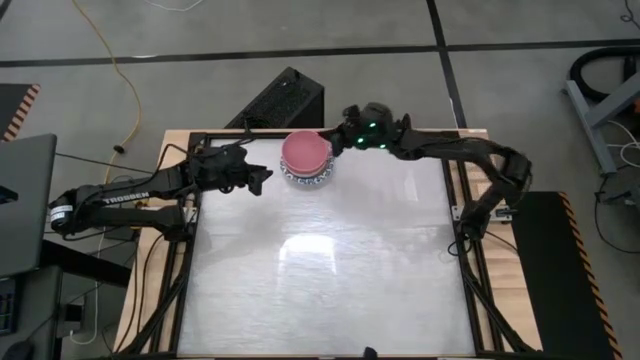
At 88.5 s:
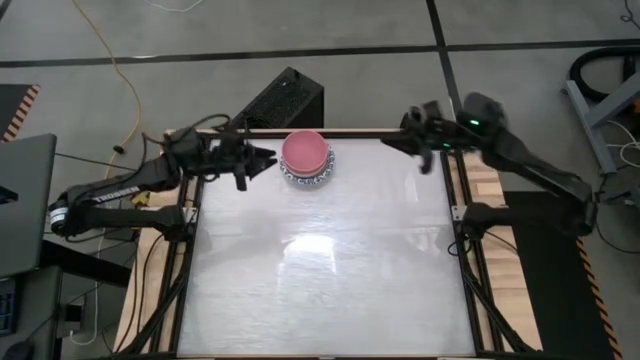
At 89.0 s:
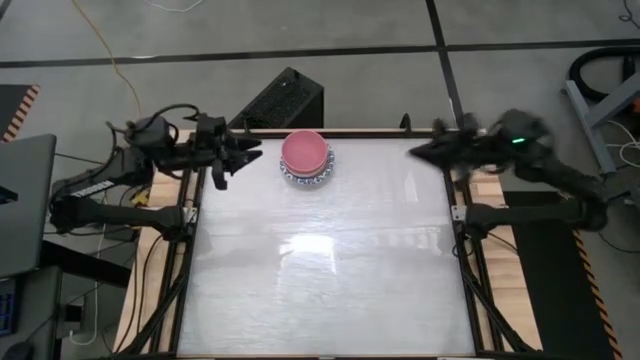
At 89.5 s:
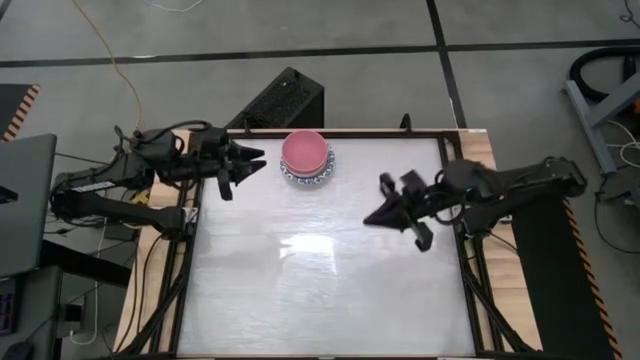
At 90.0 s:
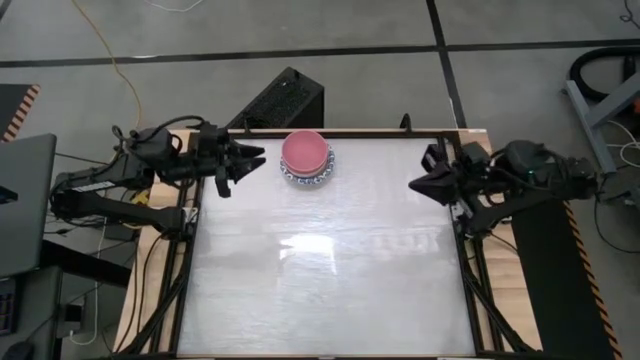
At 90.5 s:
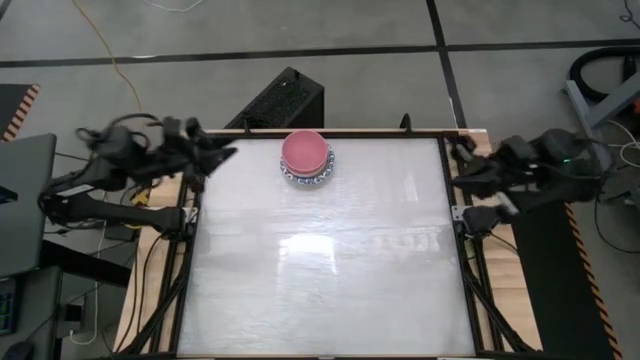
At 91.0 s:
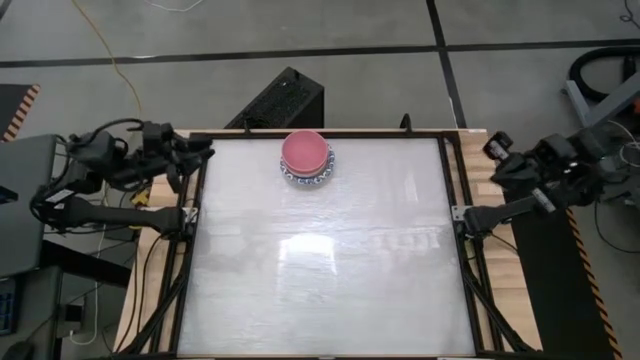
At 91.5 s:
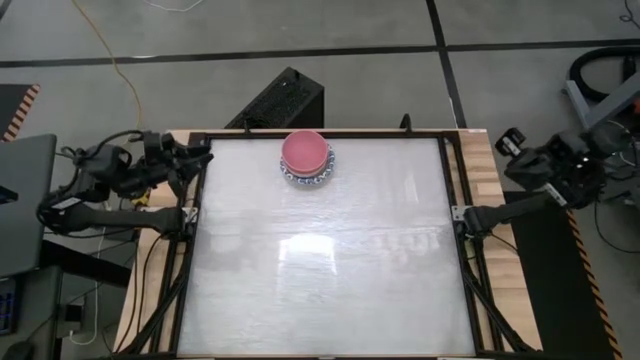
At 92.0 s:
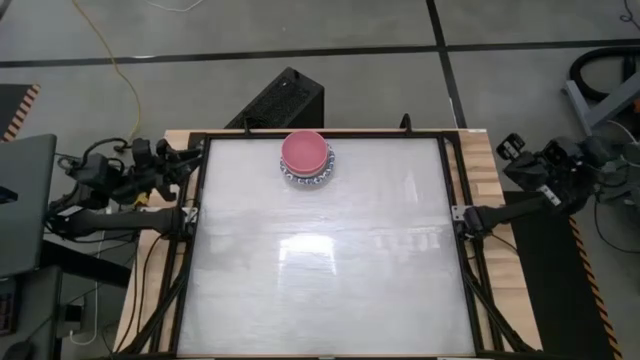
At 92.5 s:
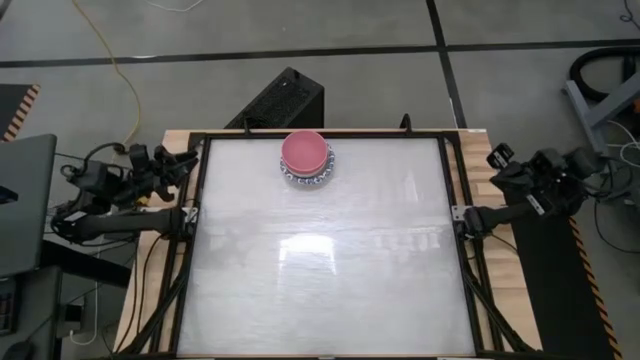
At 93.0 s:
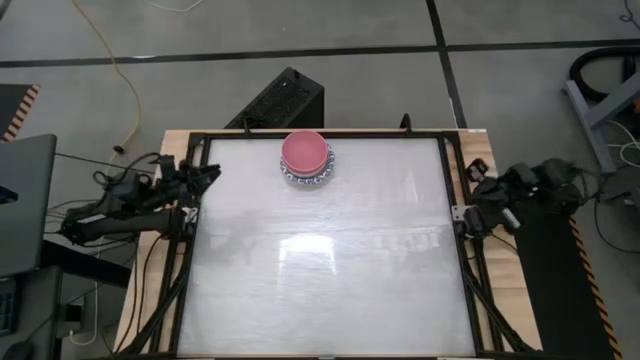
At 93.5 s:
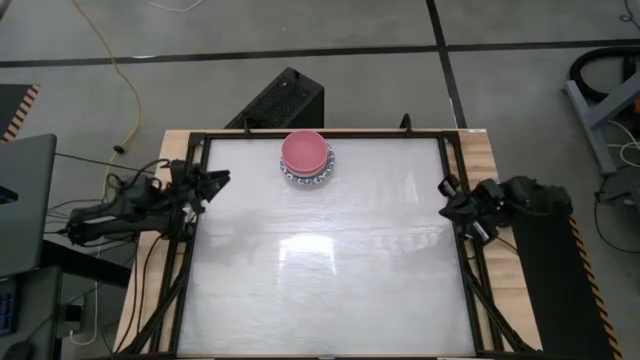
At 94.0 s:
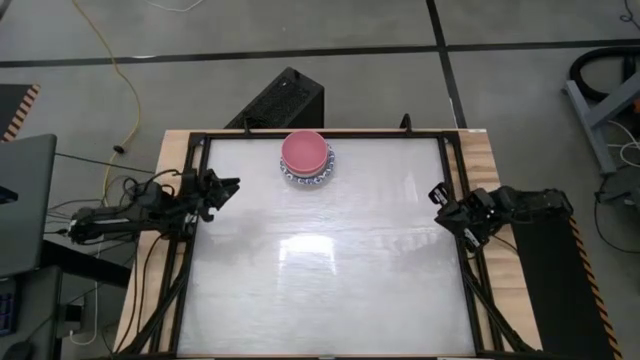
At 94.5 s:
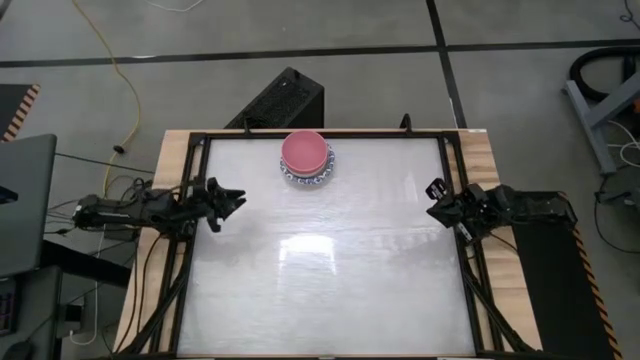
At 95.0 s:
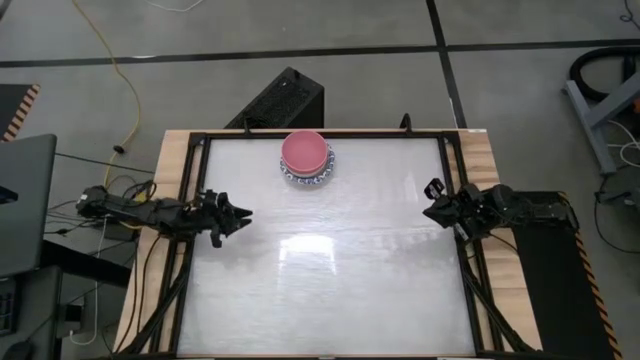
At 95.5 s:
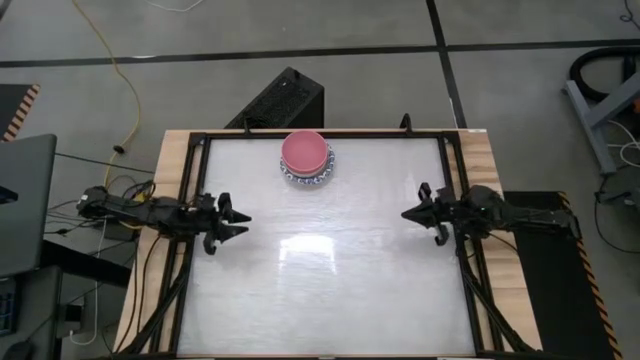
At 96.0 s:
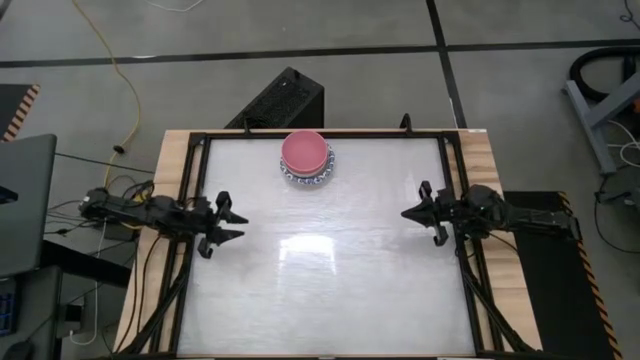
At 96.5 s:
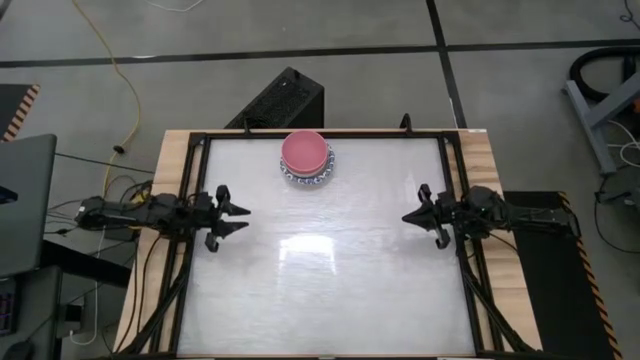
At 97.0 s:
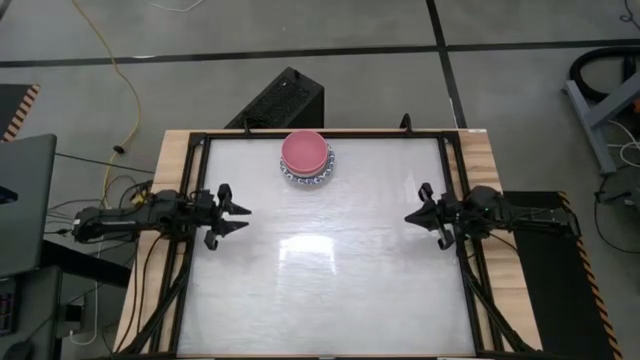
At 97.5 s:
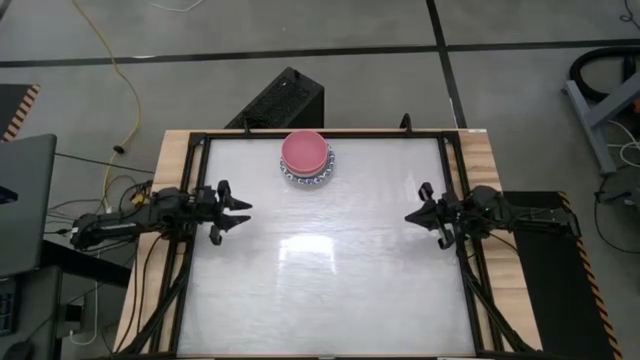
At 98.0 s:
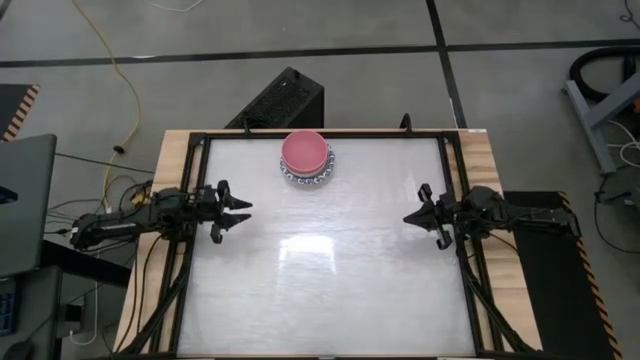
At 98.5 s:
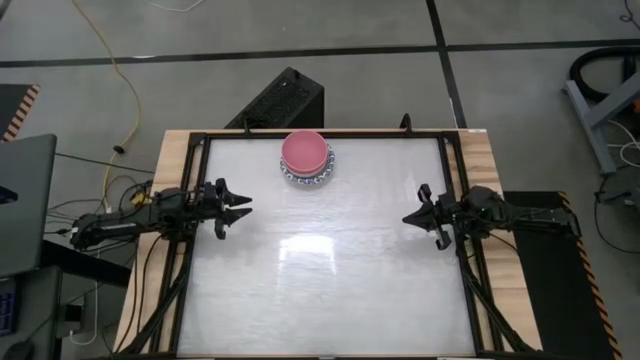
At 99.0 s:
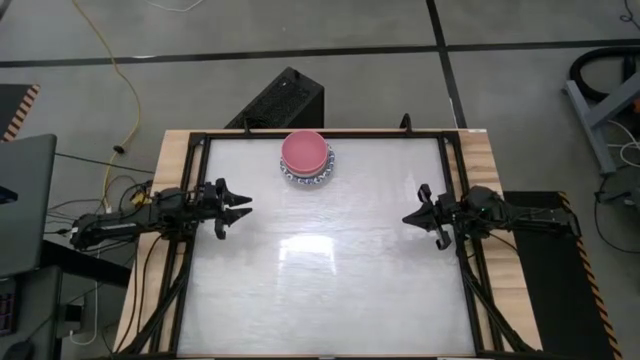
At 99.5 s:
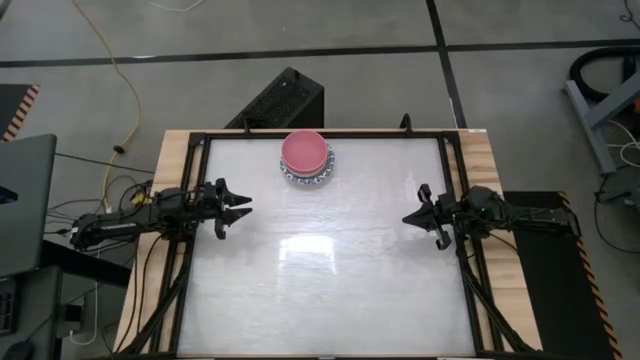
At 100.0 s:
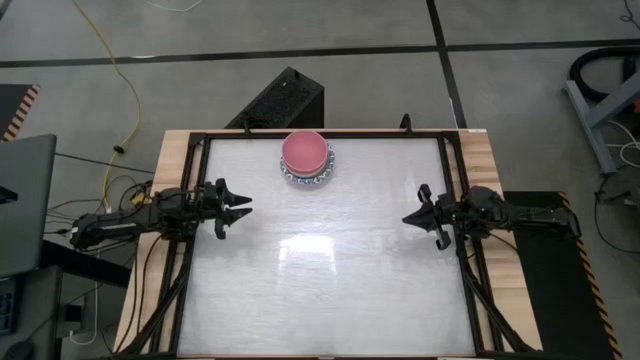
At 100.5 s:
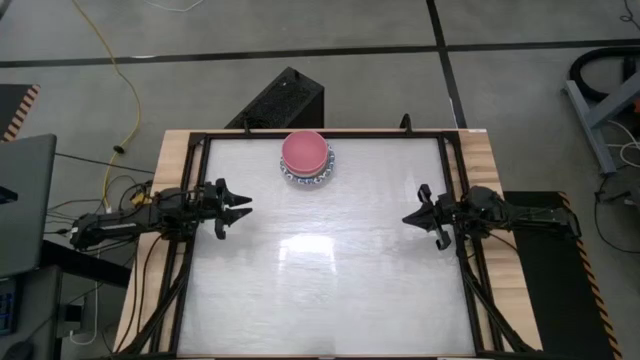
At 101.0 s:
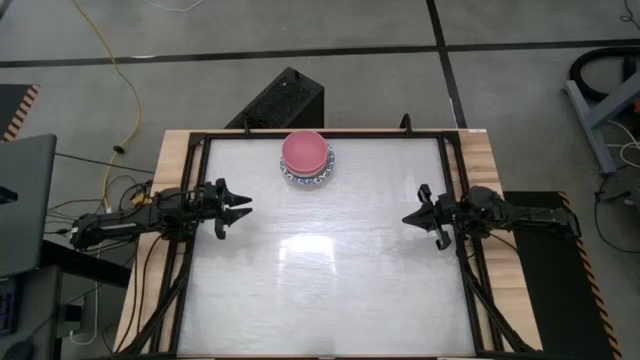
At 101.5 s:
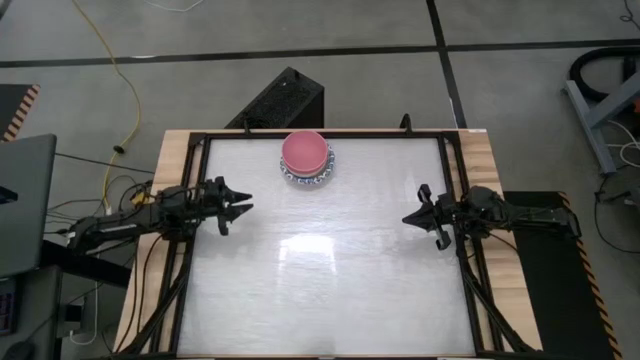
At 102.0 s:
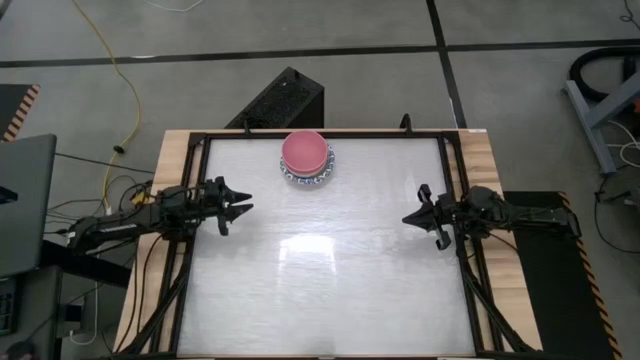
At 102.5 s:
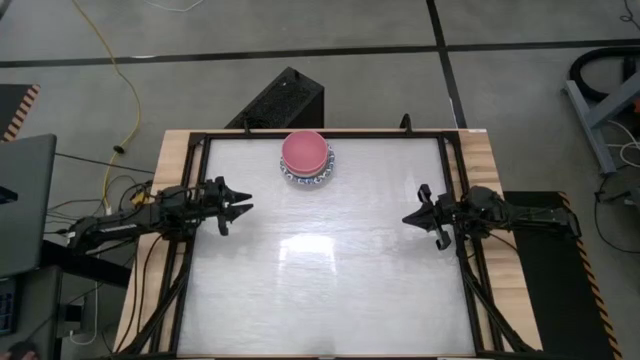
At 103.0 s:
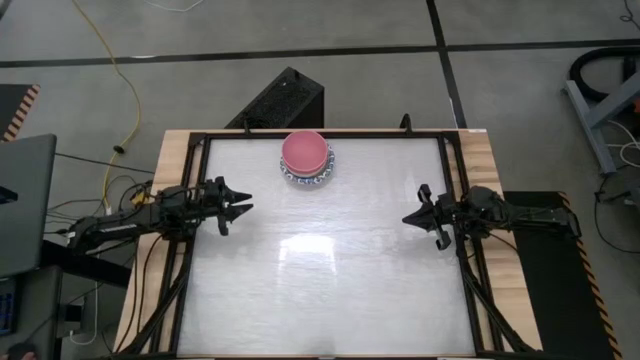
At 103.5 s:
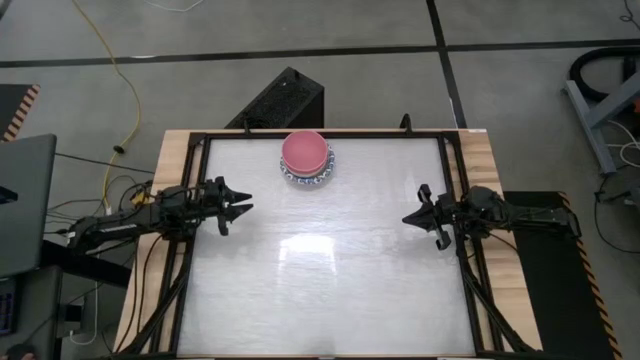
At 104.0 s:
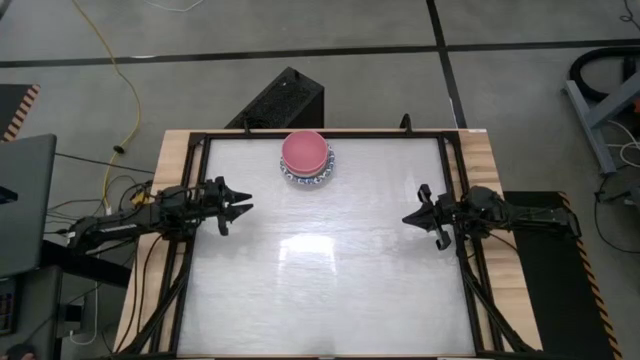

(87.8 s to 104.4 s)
Return to Home Position

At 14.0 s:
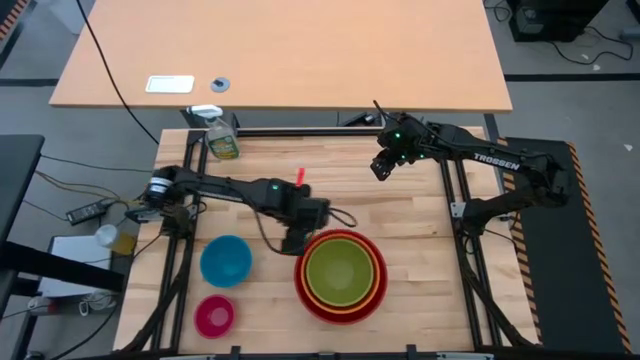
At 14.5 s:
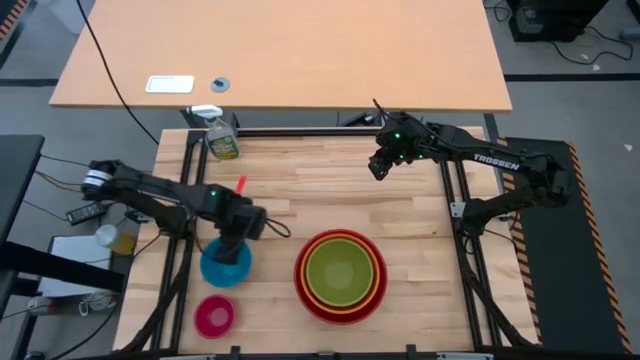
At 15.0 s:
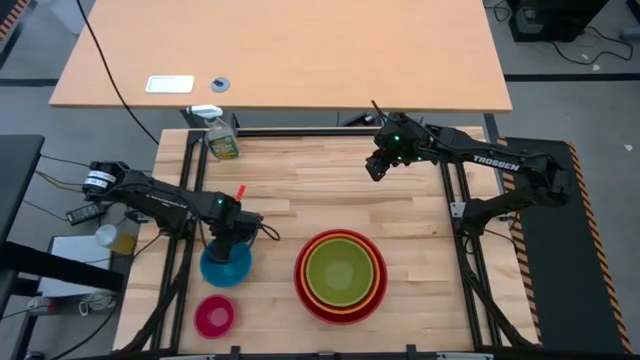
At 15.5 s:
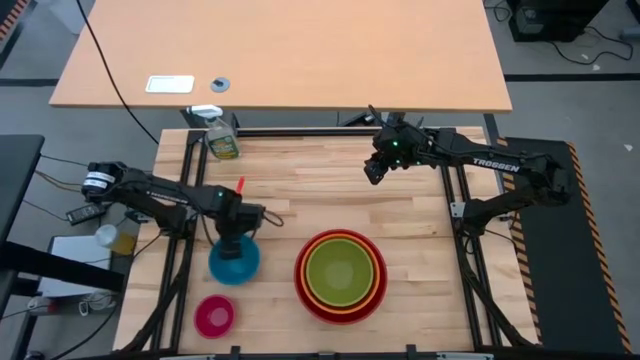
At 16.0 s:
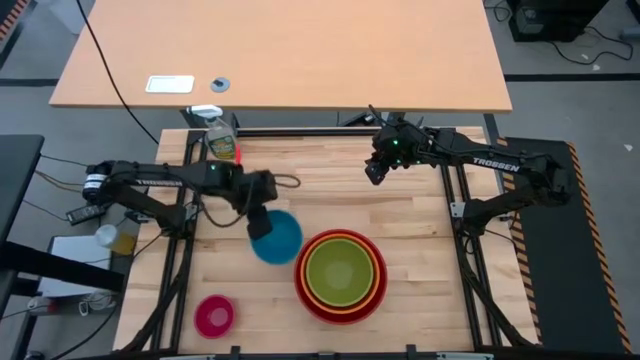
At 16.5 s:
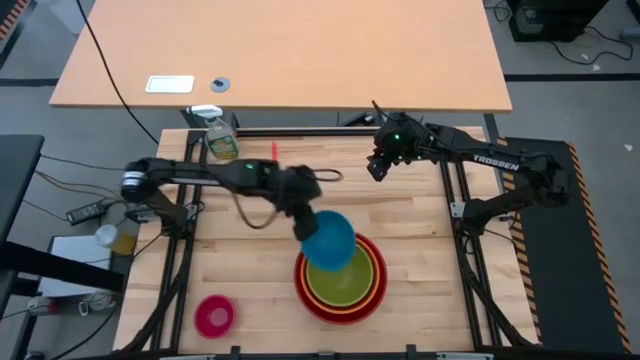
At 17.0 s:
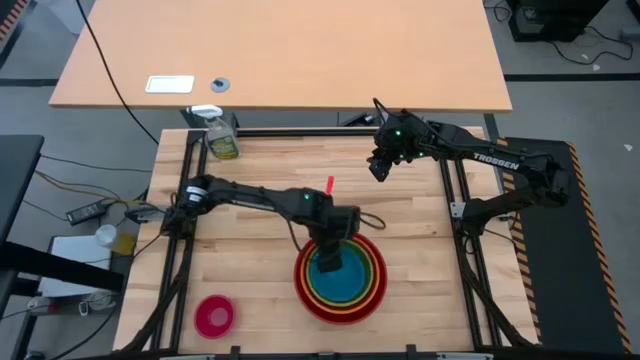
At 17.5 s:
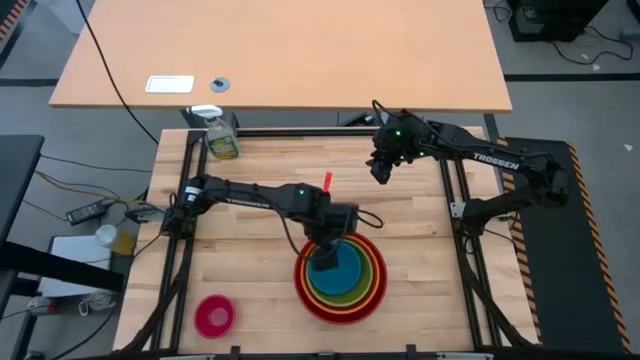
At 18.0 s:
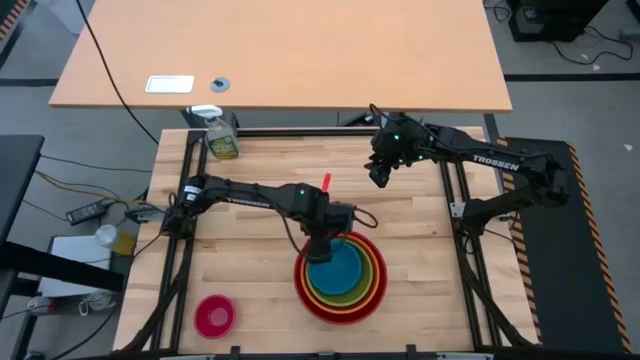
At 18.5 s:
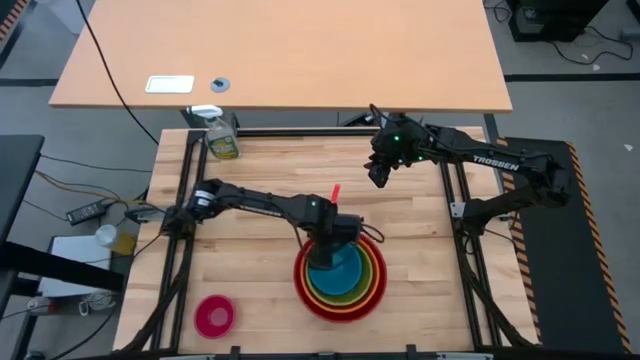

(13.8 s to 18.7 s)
Stack the blue bowl on top of the green bowl
